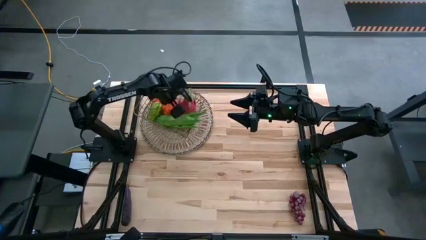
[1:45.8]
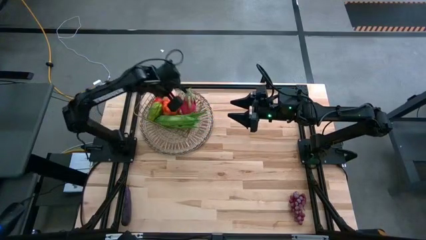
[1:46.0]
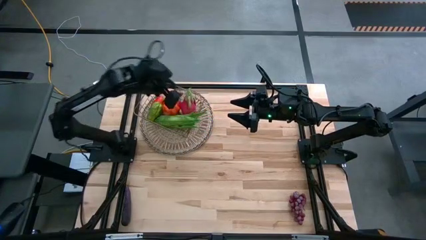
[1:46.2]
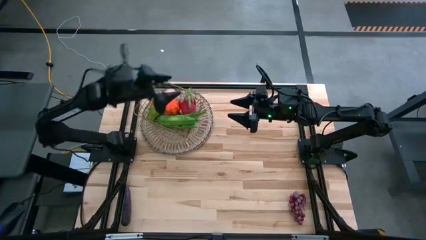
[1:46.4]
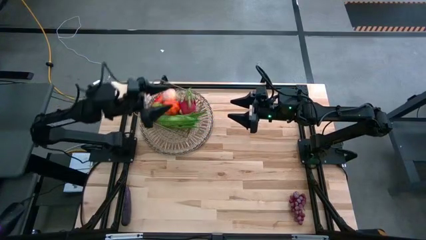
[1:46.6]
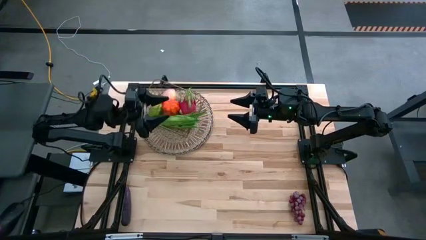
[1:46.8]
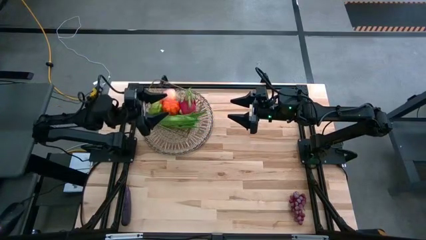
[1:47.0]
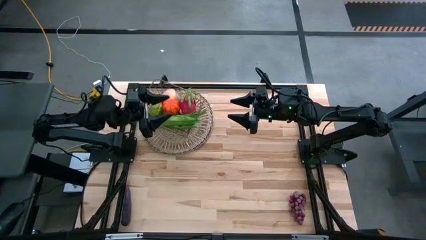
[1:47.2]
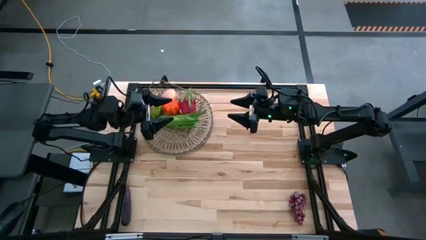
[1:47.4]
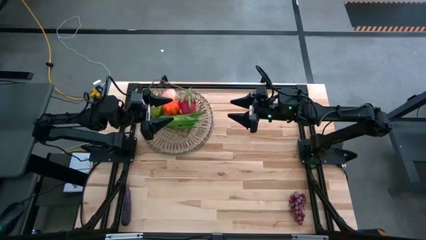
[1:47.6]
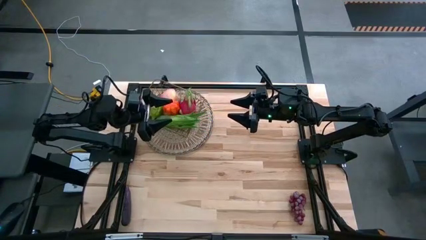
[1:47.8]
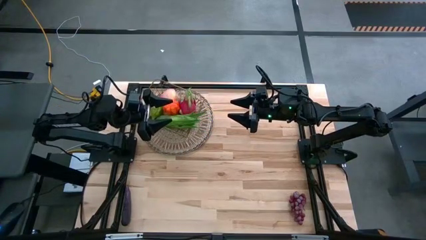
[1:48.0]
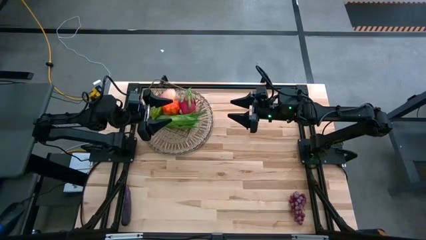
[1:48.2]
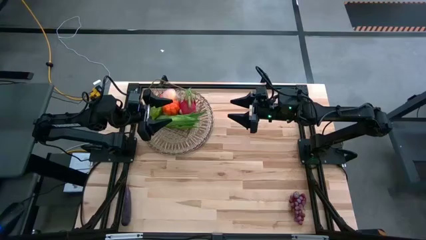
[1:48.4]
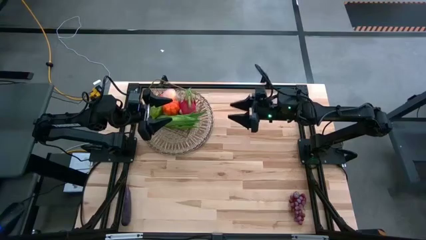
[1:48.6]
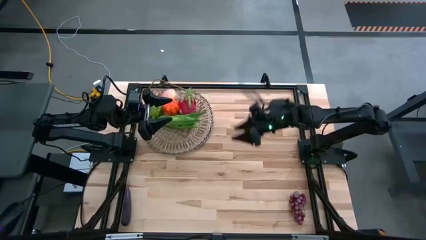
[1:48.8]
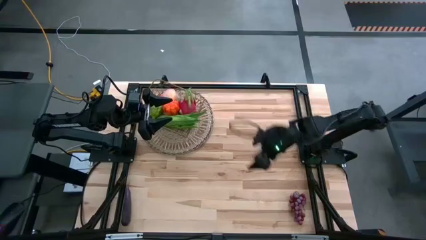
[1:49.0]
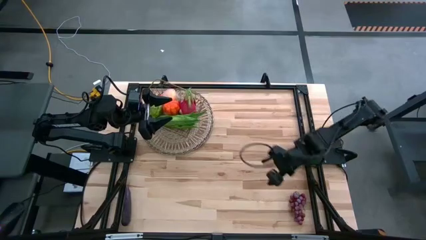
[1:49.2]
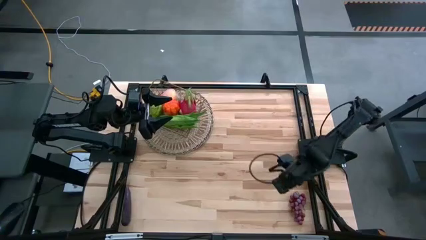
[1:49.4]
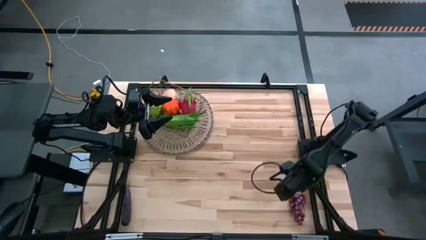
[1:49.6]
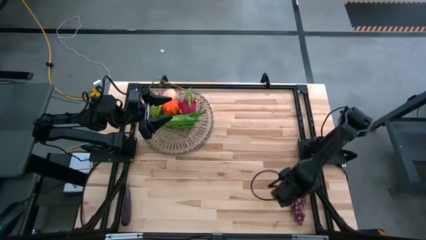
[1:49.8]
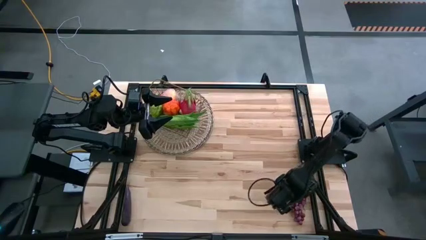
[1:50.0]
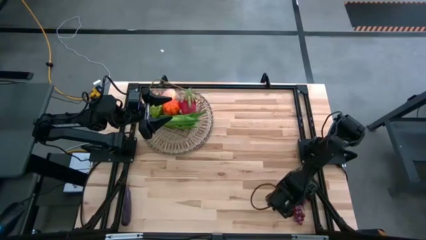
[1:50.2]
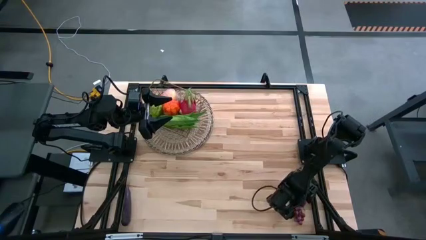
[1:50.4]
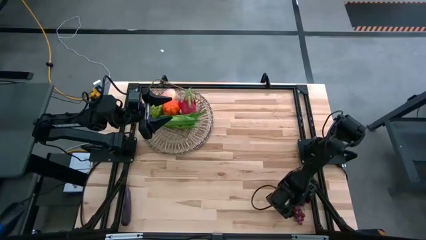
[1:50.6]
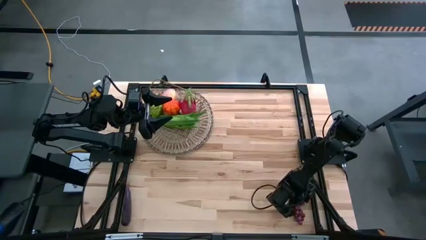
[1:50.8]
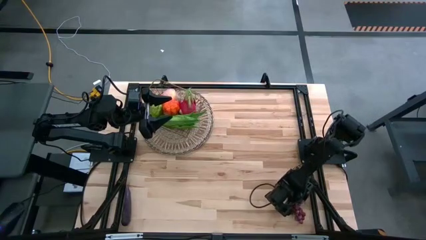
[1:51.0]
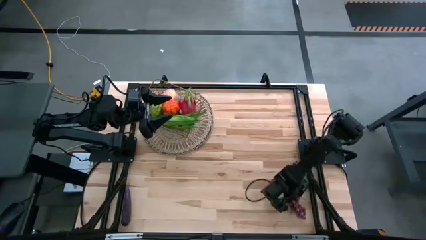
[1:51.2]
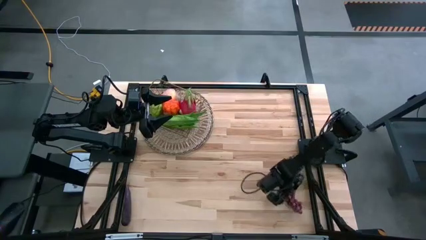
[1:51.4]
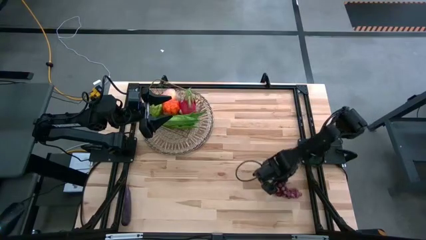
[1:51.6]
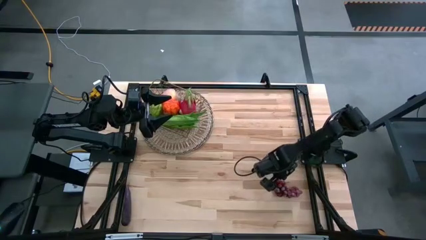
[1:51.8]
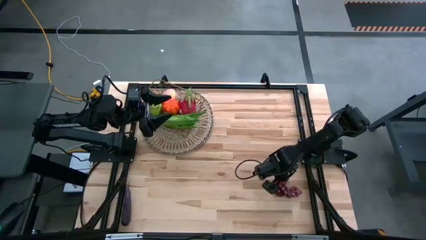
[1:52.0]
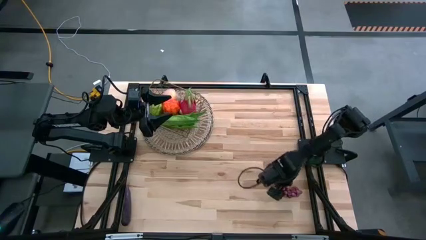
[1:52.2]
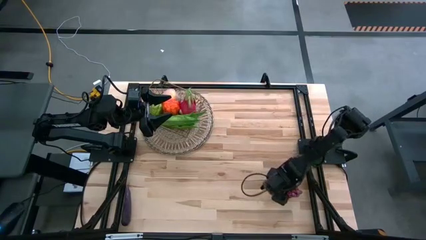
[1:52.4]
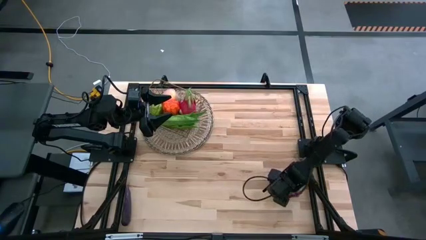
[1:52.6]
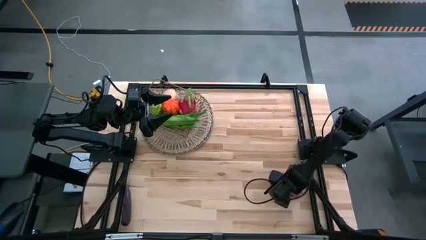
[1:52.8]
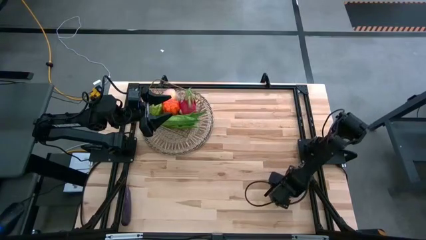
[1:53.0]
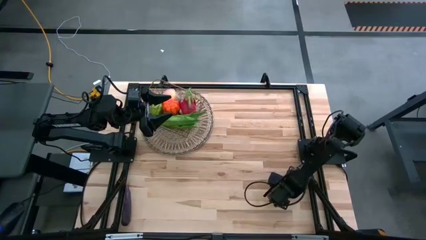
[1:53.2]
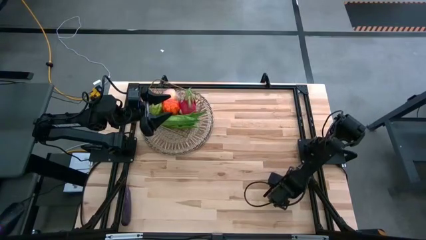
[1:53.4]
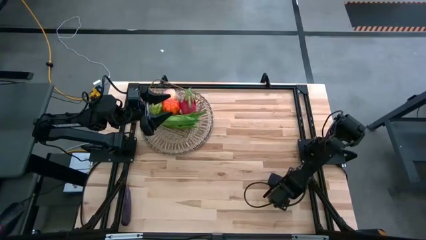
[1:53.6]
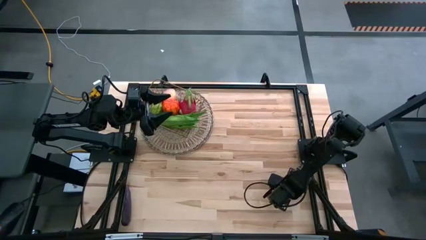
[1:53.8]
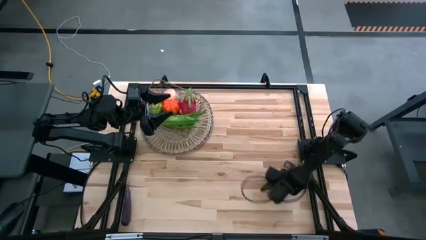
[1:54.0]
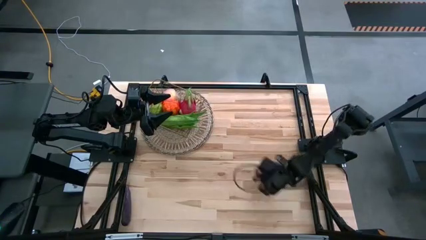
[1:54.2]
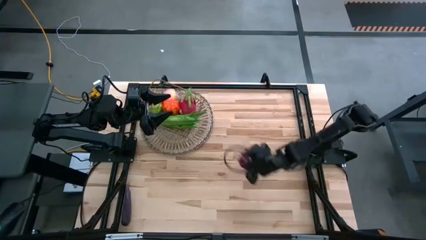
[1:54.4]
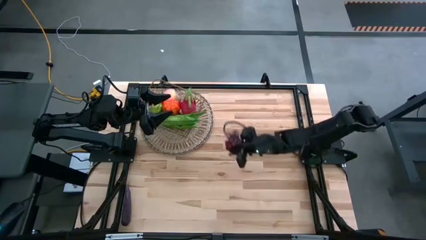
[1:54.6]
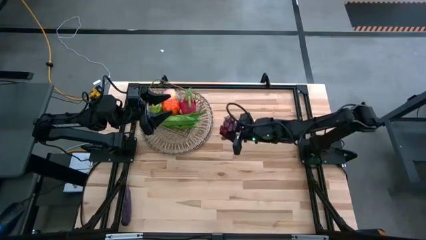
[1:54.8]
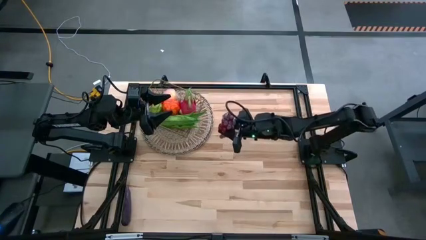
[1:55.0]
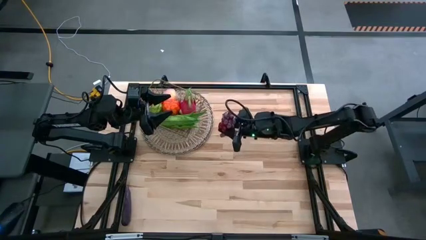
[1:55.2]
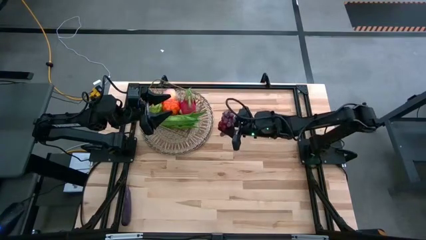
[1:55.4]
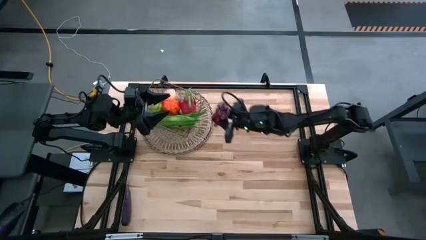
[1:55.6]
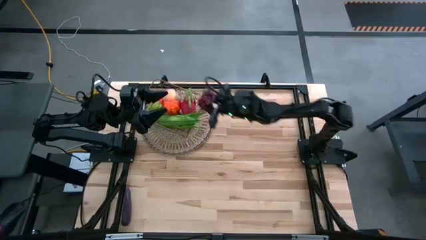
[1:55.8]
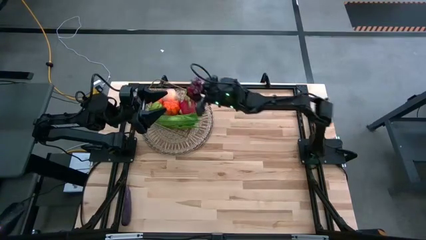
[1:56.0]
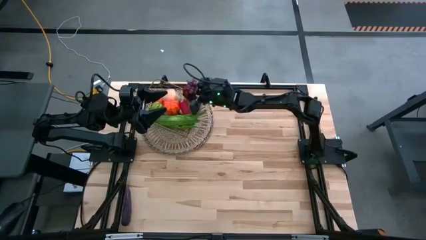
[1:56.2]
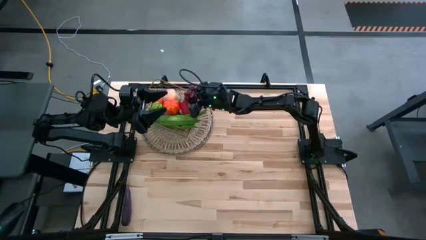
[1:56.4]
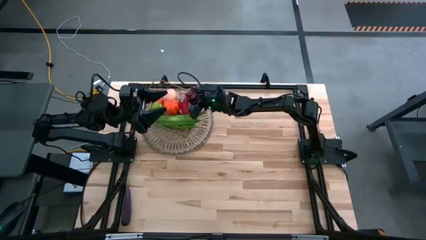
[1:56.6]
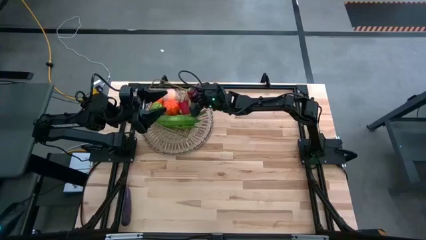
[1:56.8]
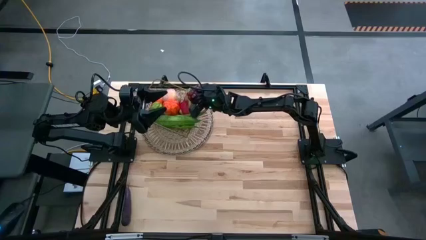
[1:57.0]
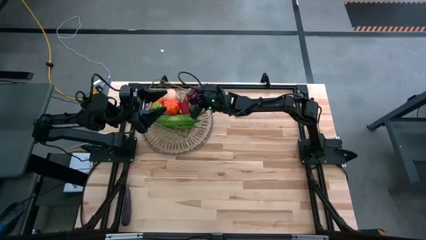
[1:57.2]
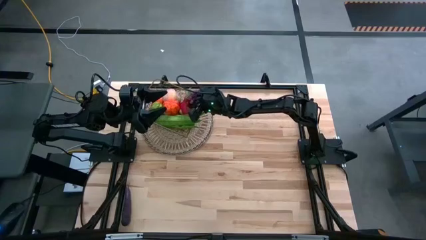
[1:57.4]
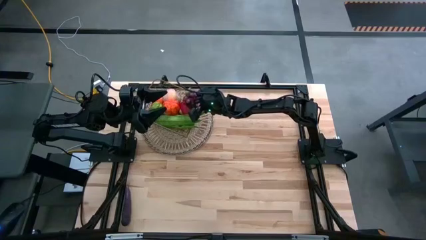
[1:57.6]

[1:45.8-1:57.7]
Task: Build produce basket
Put the grapes into the wire basket

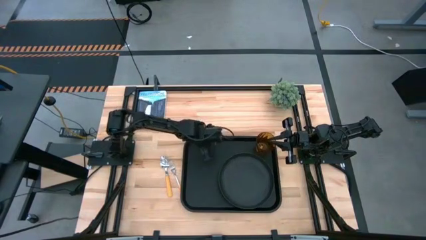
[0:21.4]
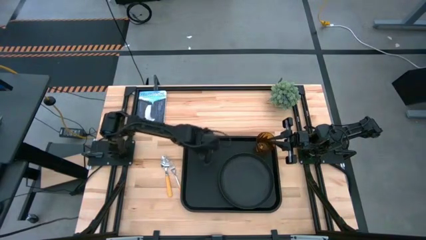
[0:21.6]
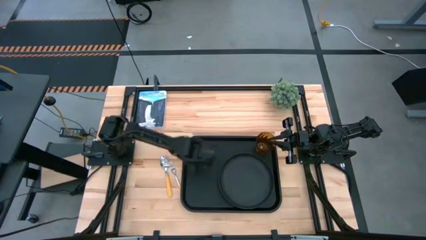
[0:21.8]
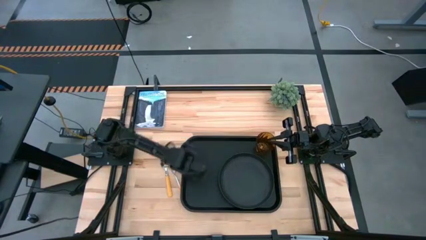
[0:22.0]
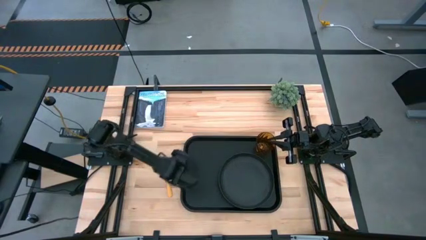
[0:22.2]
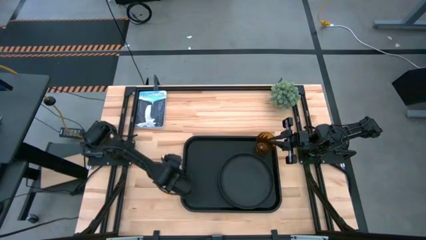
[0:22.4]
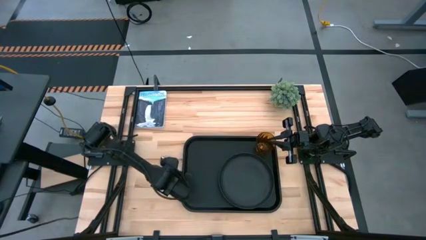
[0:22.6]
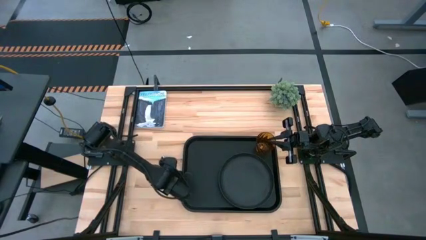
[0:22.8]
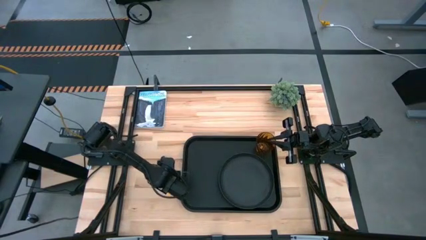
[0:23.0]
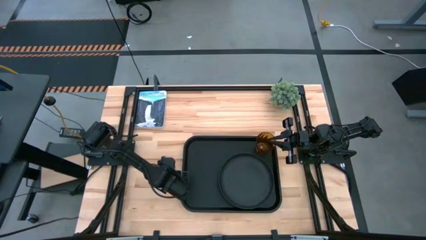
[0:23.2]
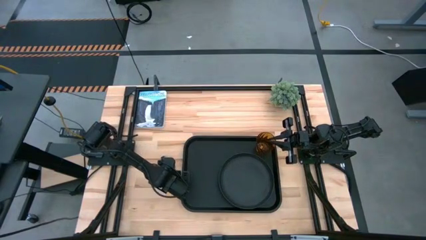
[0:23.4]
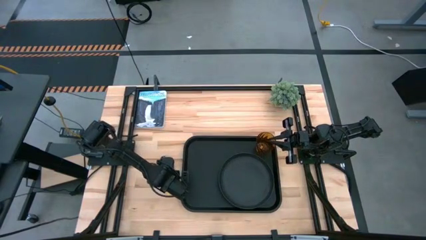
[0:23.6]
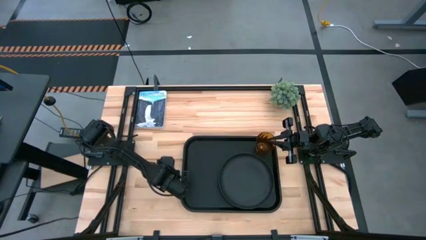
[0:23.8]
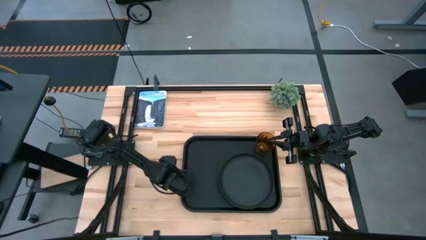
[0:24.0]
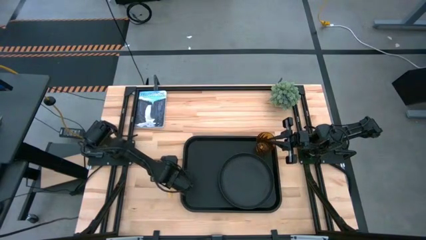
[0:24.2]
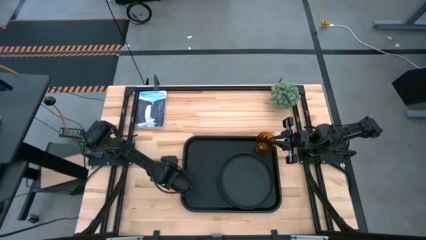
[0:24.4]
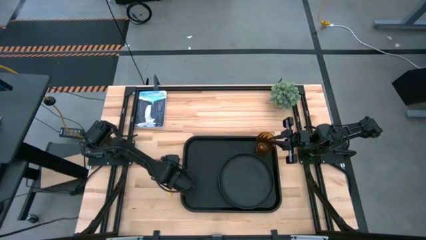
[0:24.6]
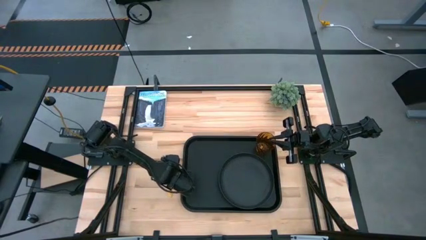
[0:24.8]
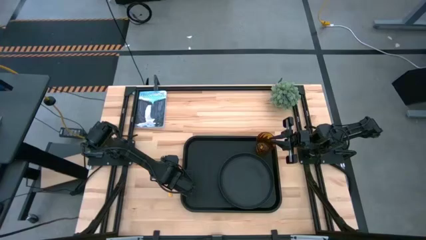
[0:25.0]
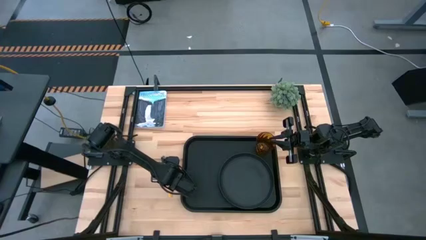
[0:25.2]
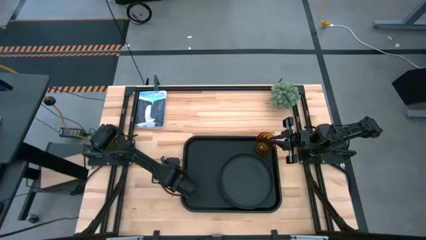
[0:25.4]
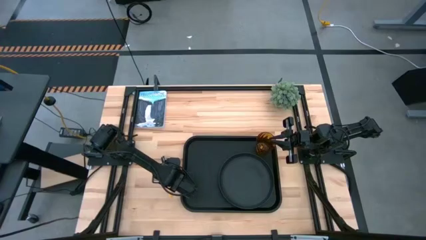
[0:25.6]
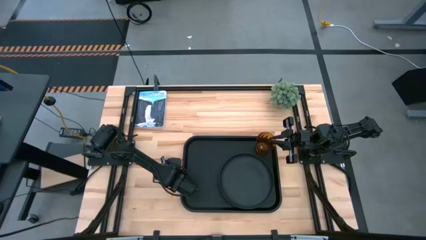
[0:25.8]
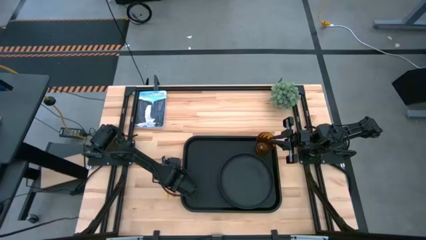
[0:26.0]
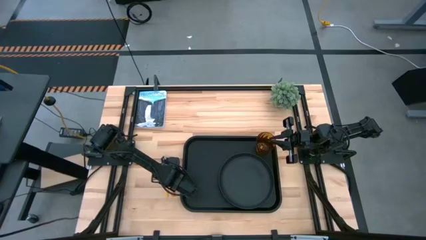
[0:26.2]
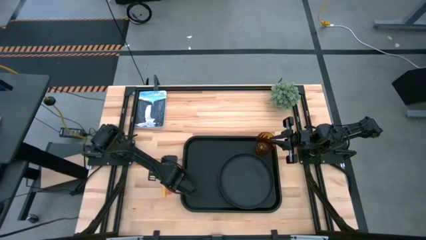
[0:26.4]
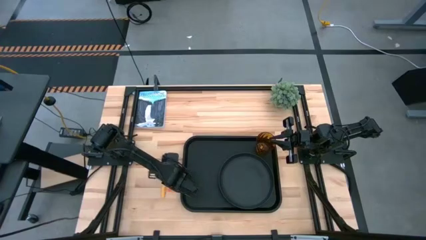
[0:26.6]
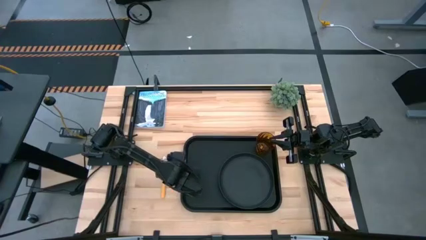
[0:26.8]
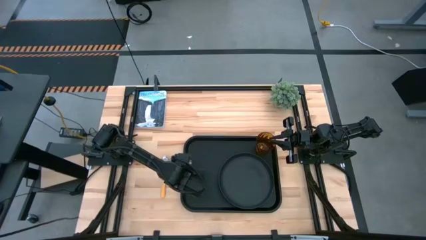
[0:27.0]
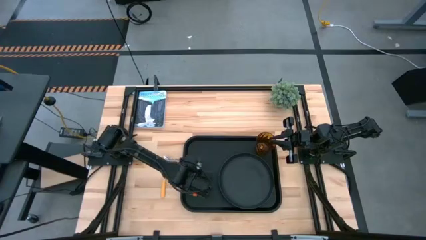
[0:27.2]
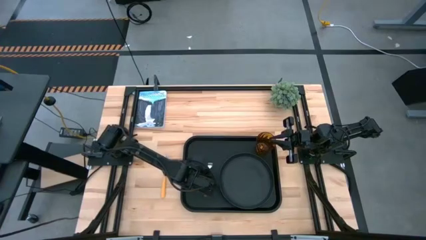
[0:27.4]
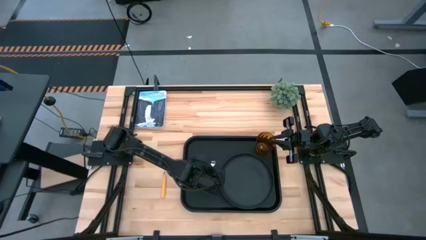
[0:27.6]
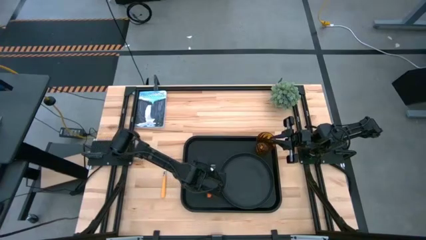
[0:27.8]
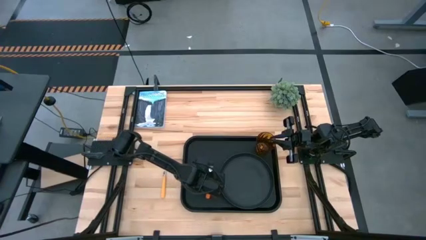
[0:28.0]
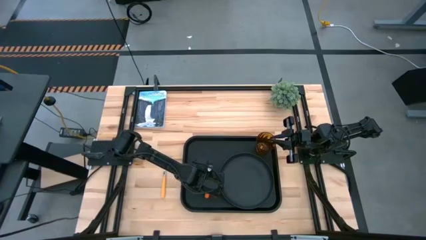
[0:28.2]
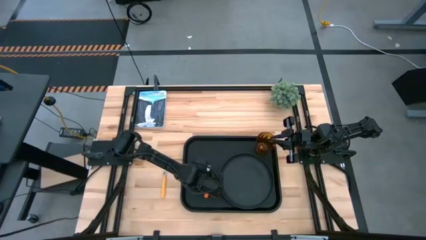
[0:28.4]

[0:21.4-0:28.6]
Task: Pick and place plate/cup/fork/spoon on tray
Put the orange fork on the black serving tray to the left of the black plate
